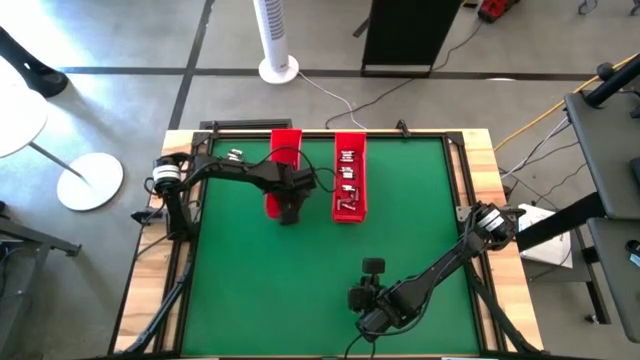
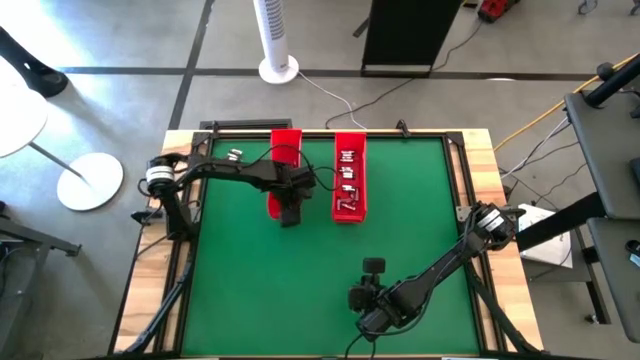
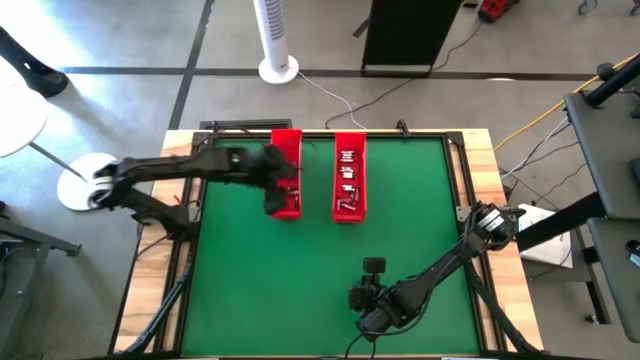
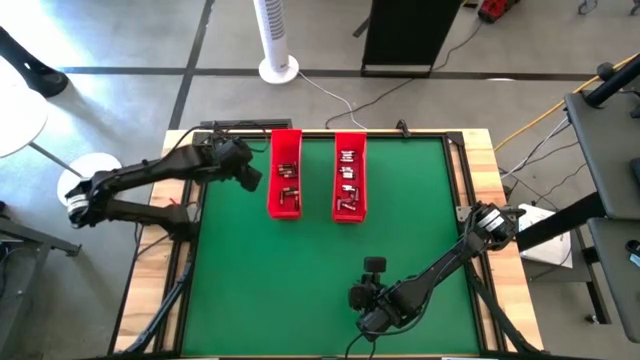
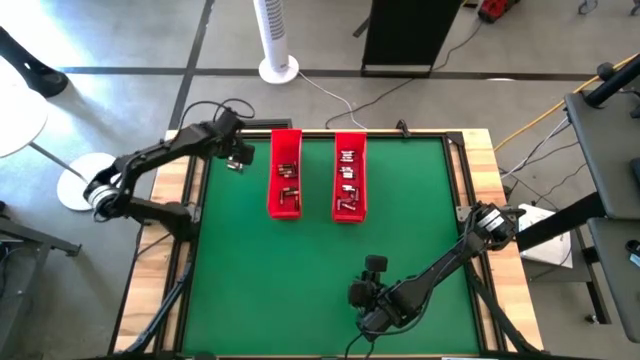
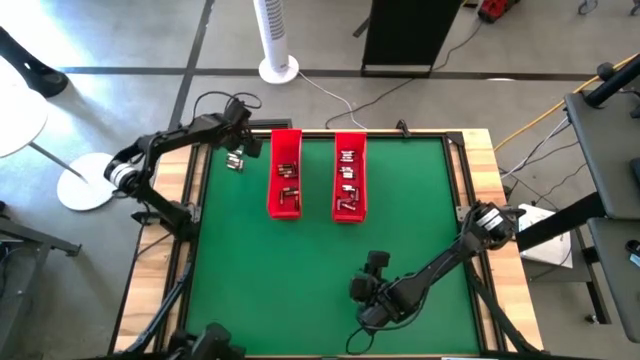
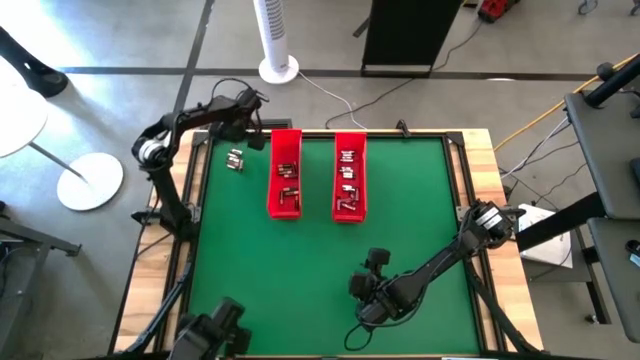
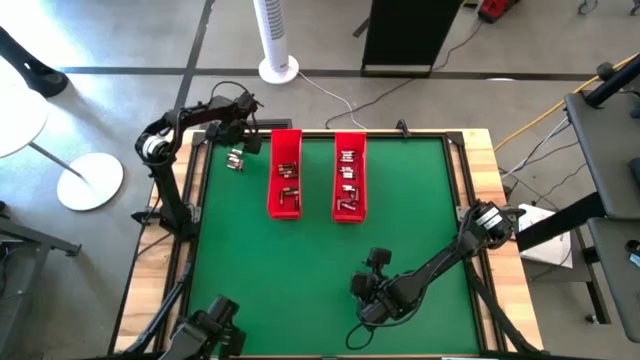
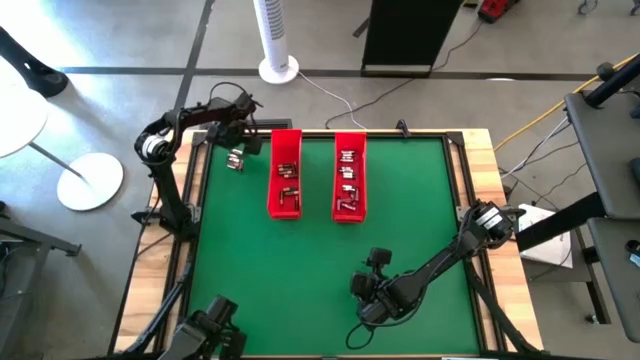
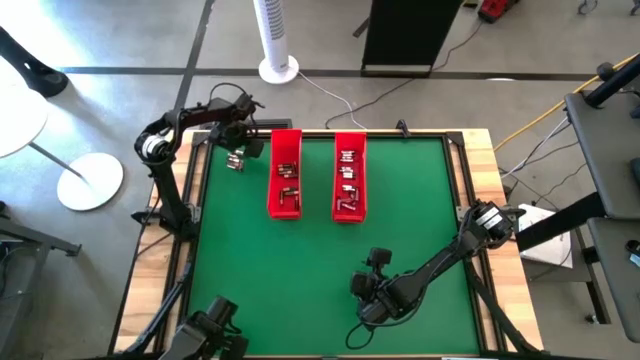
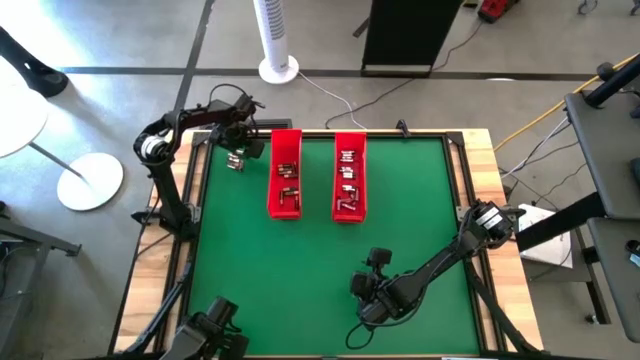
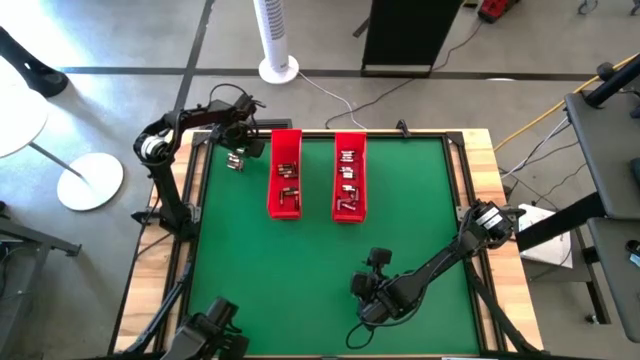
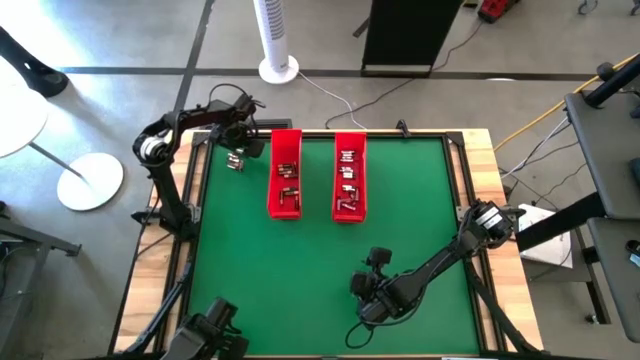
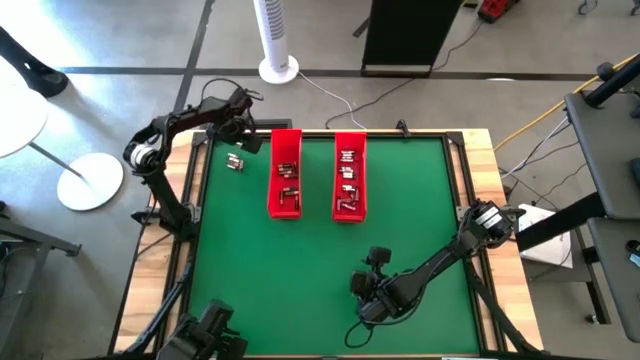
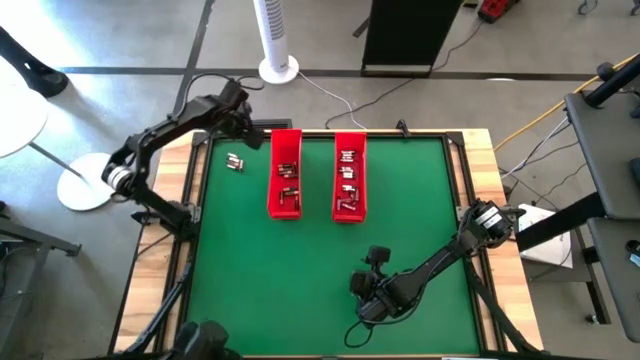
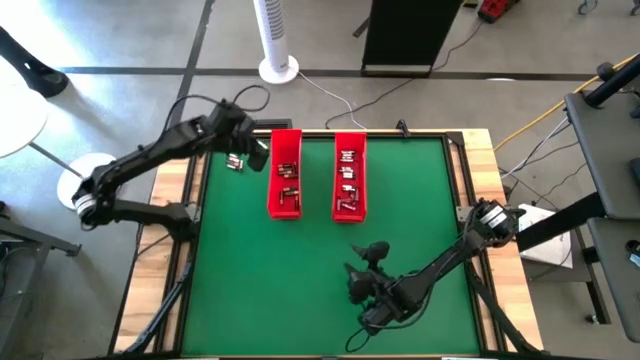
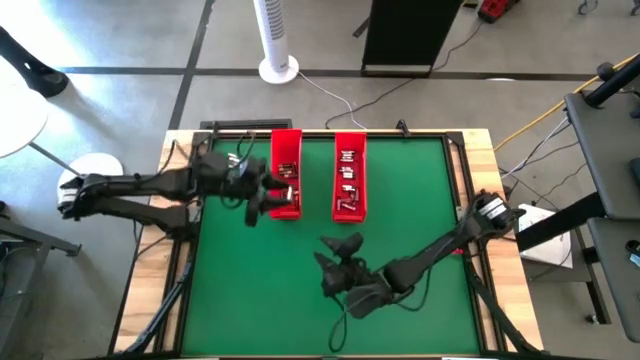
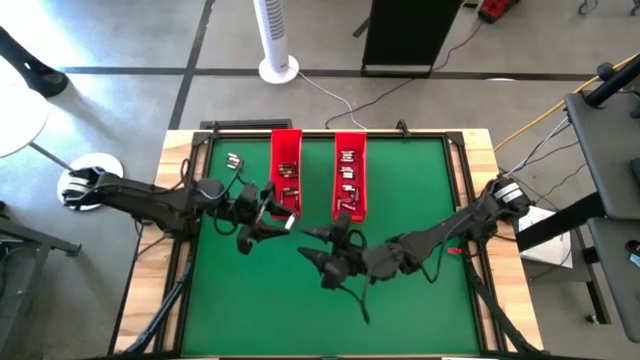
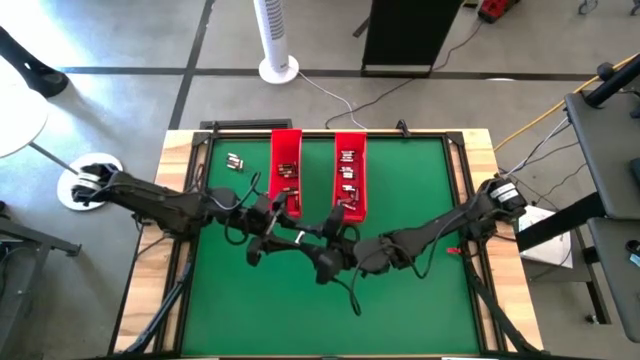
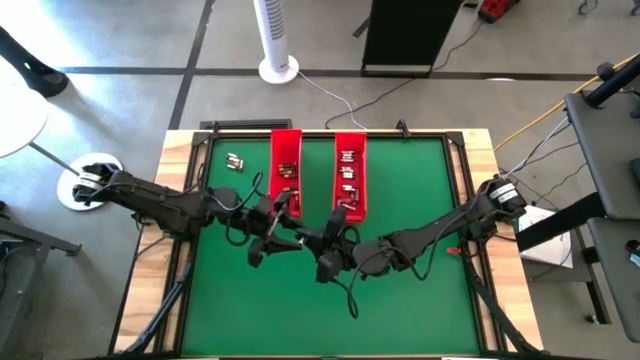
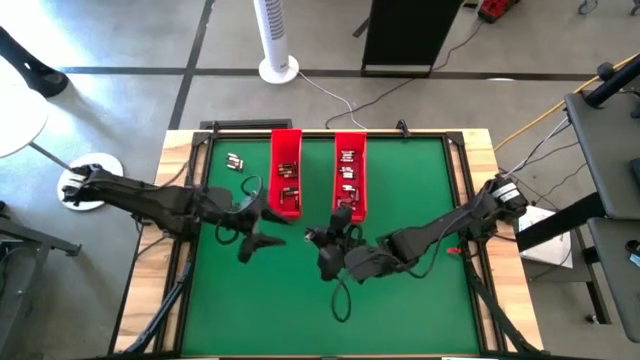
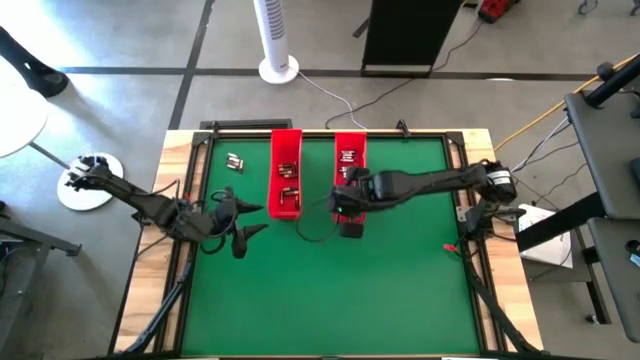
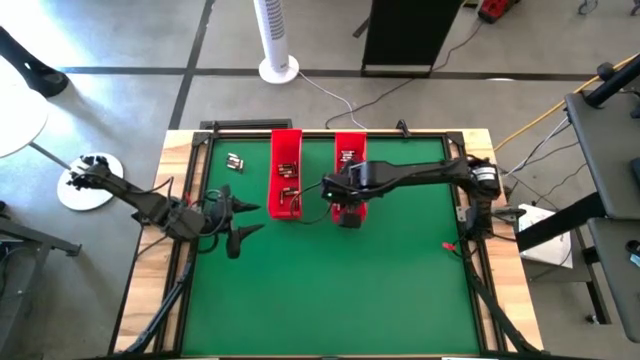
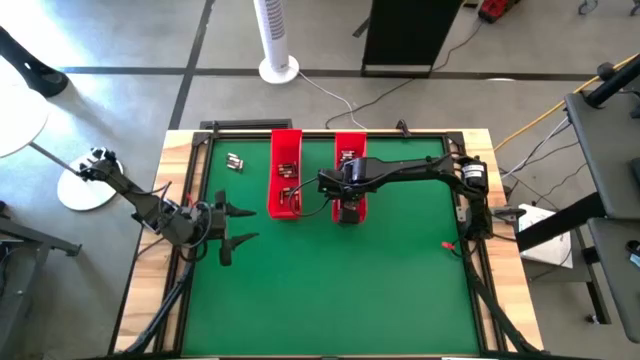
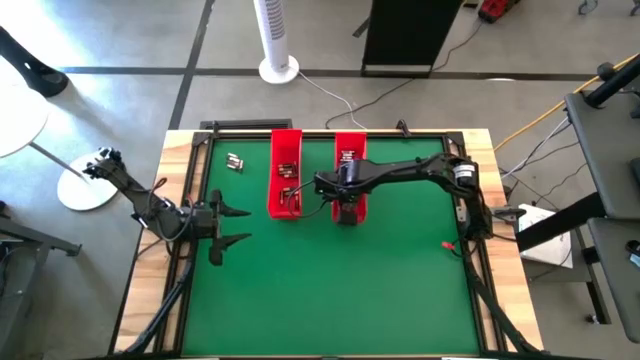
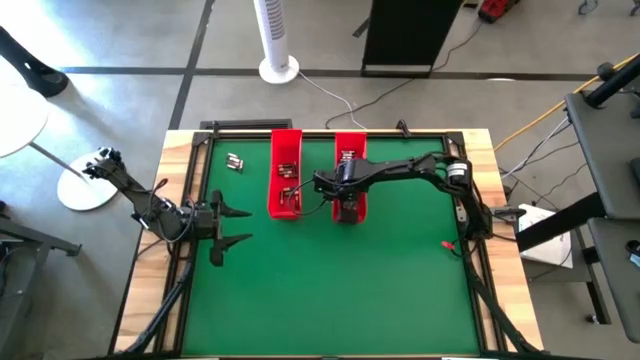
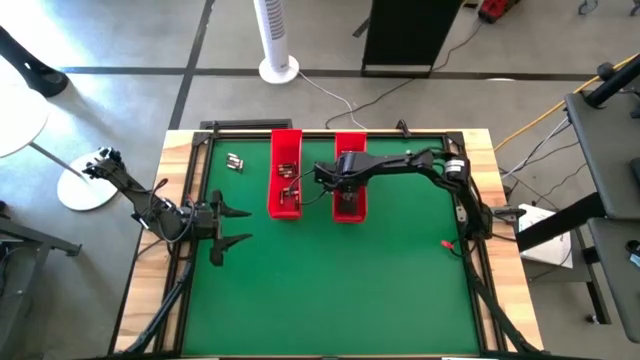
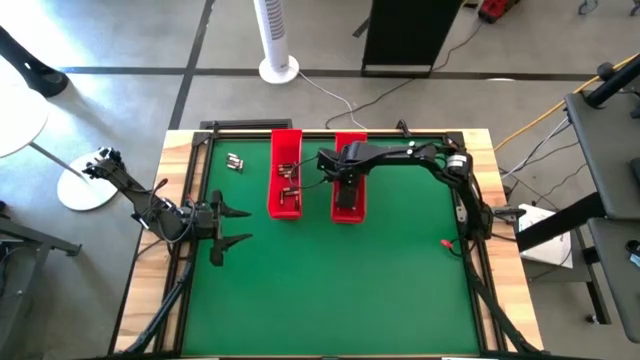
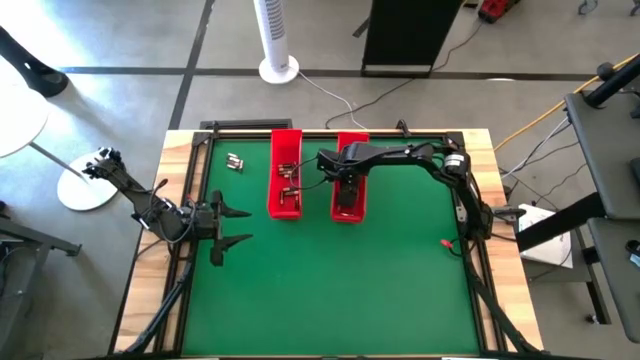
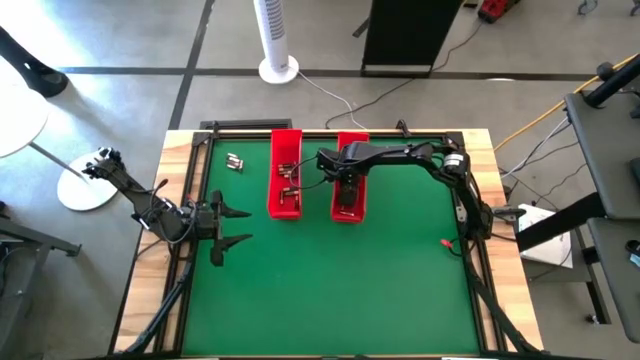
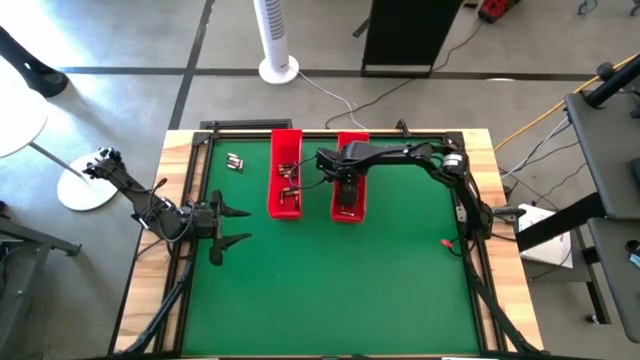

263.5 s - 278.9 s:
Task: Sort batteries
Put the silver battery into the right red bin

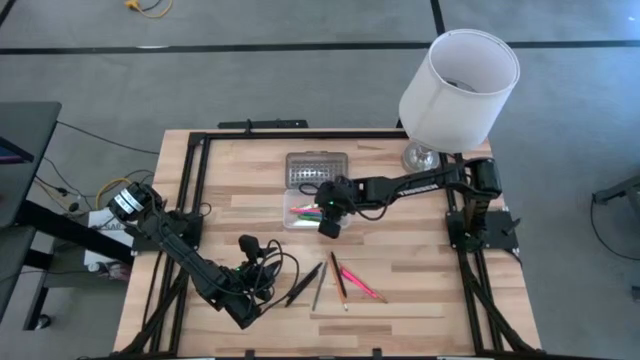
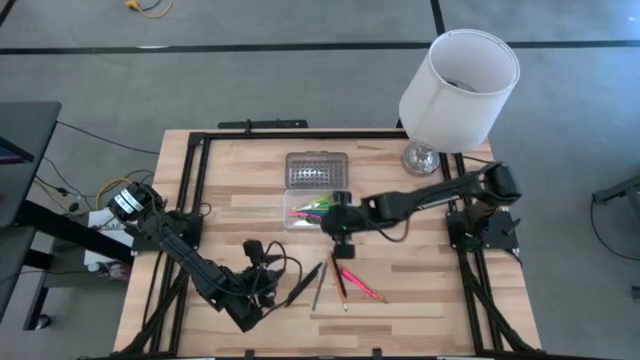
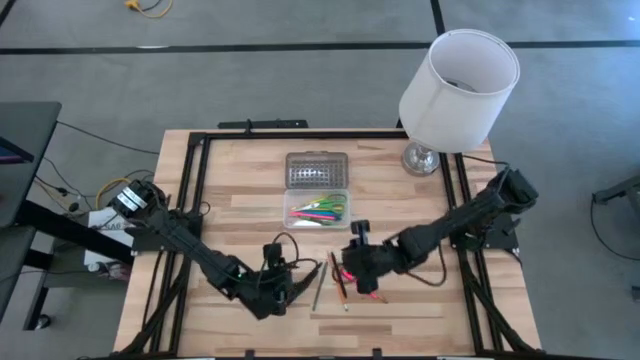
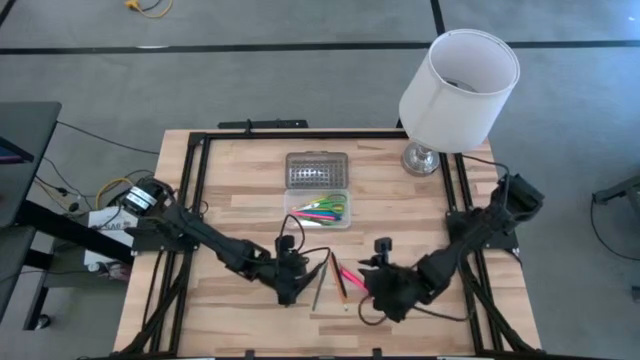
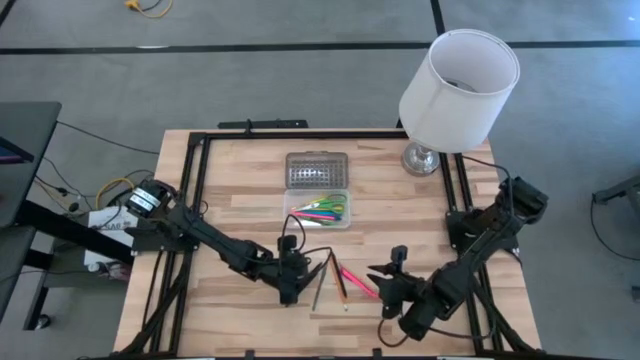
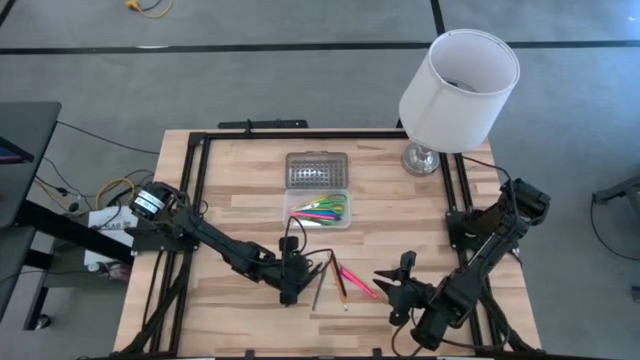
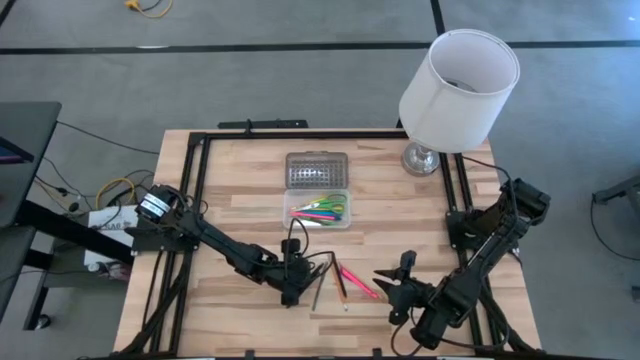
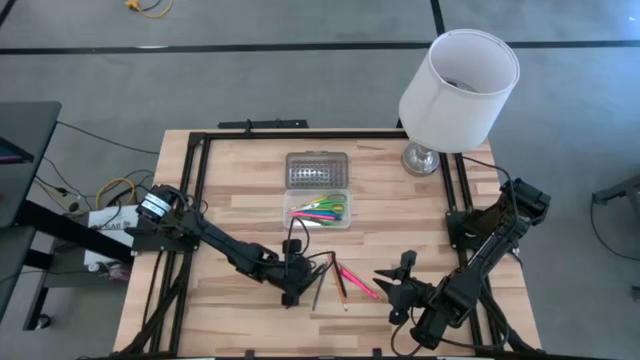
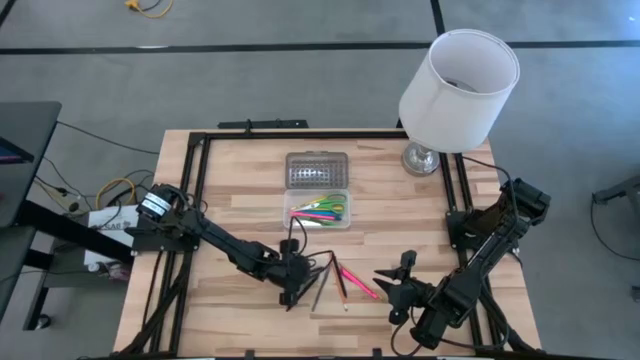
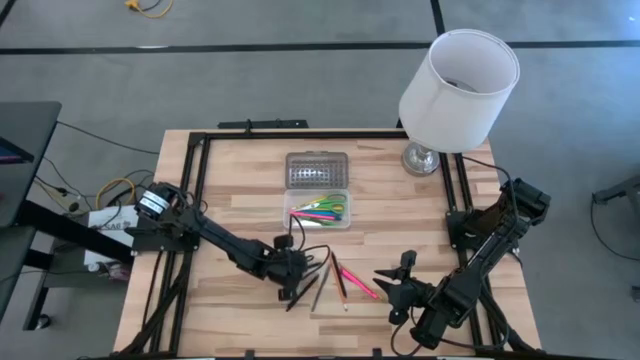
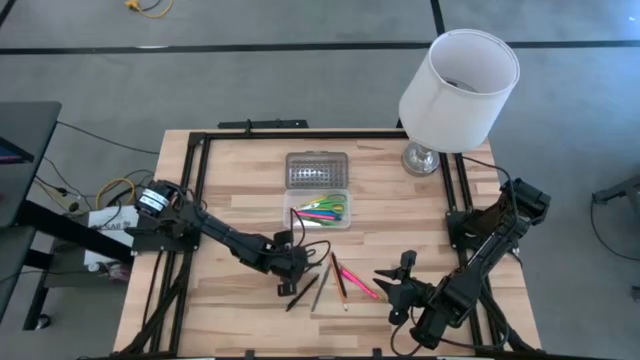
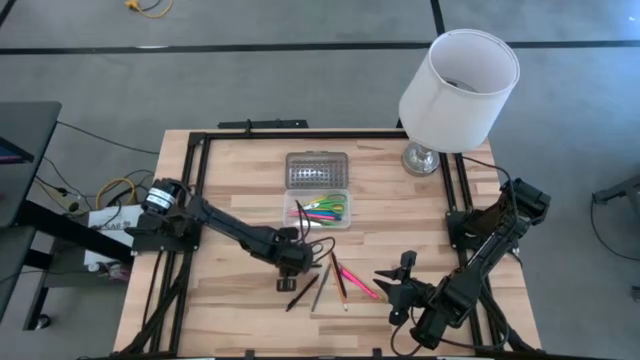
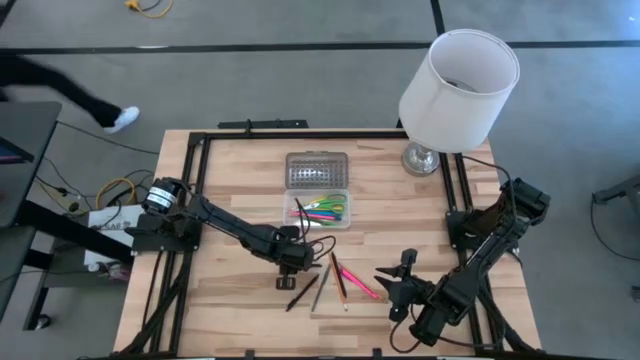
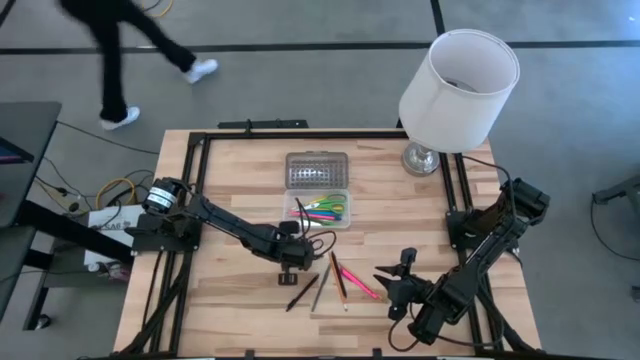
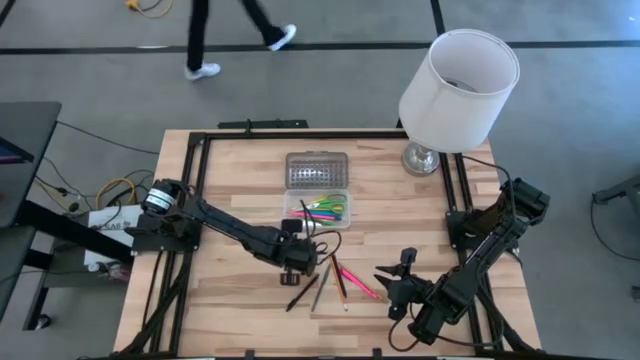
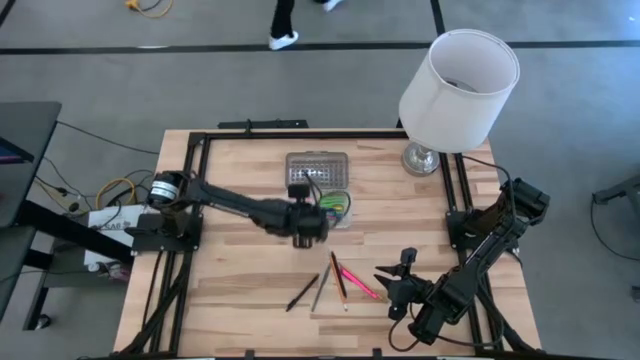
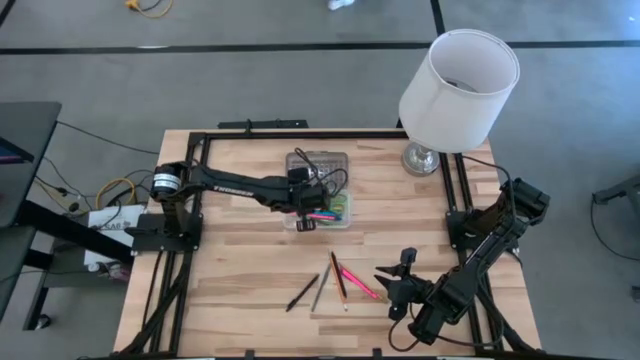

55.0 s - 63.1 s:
Task: Pick & place school supplies into a supply box
Put the left black pen into the black supply box
